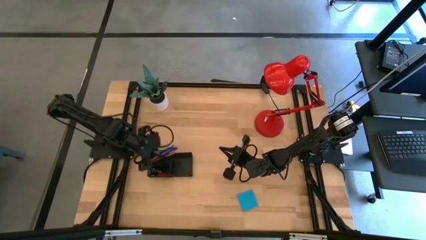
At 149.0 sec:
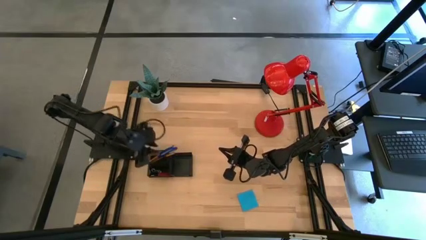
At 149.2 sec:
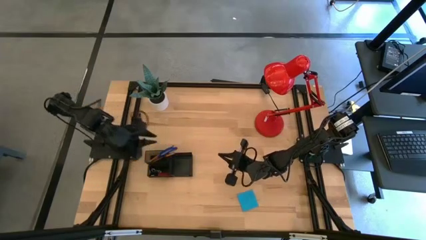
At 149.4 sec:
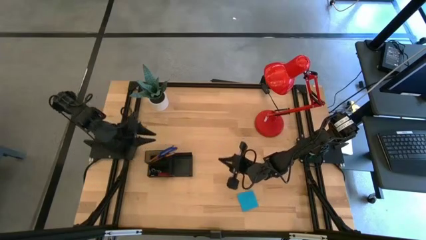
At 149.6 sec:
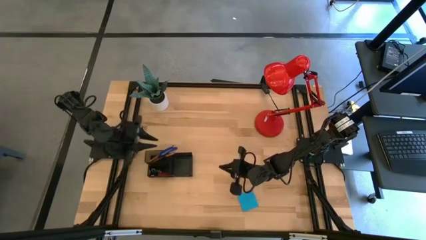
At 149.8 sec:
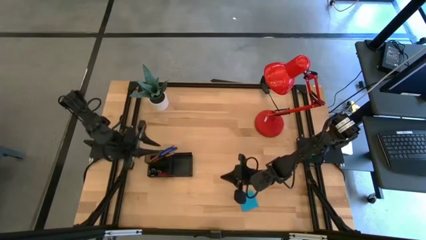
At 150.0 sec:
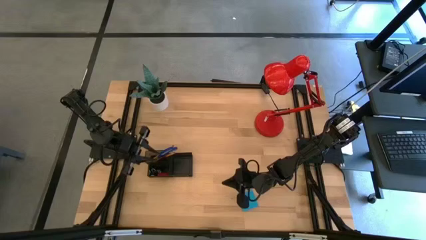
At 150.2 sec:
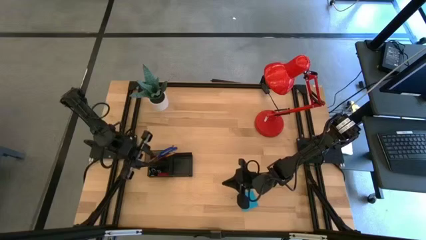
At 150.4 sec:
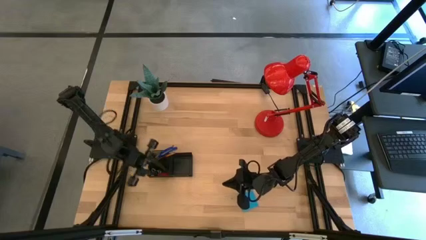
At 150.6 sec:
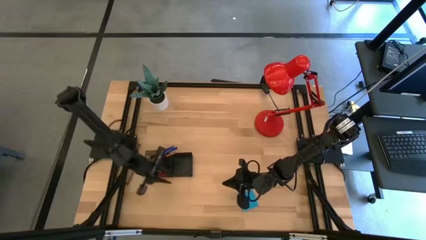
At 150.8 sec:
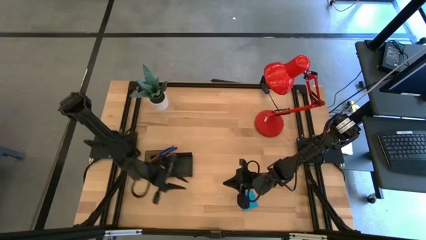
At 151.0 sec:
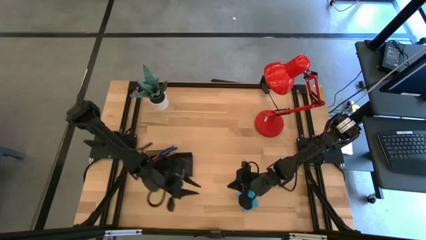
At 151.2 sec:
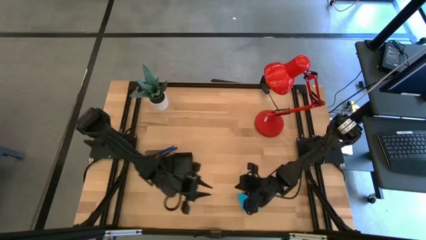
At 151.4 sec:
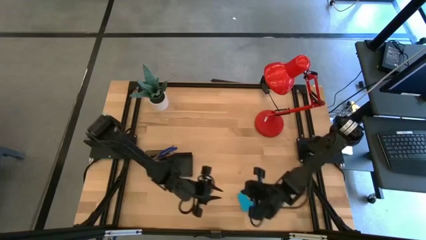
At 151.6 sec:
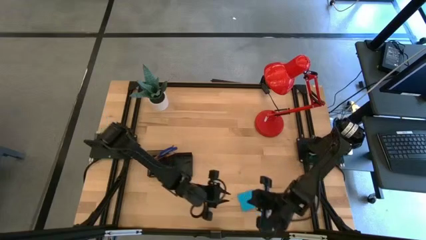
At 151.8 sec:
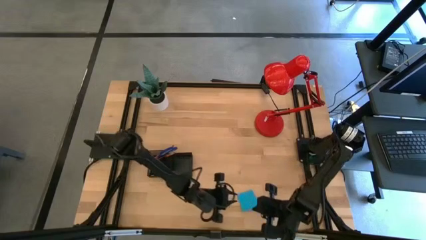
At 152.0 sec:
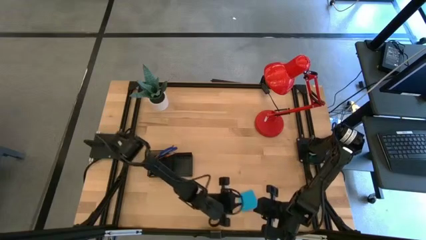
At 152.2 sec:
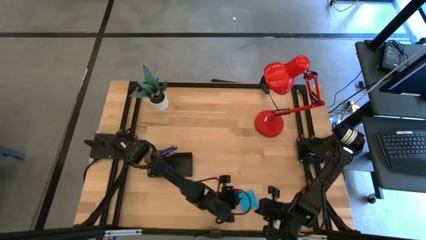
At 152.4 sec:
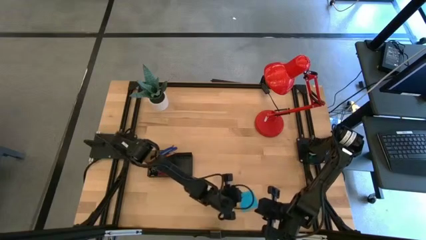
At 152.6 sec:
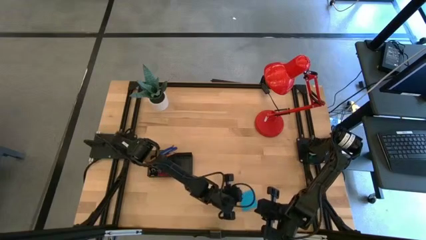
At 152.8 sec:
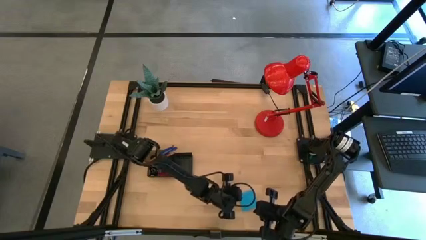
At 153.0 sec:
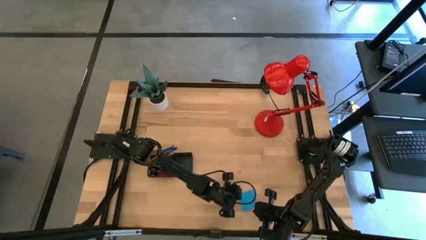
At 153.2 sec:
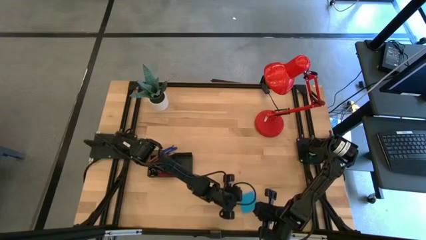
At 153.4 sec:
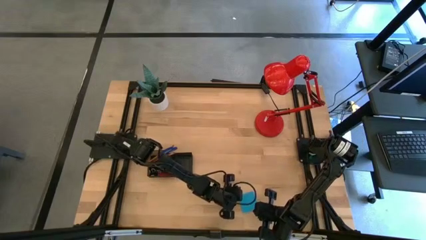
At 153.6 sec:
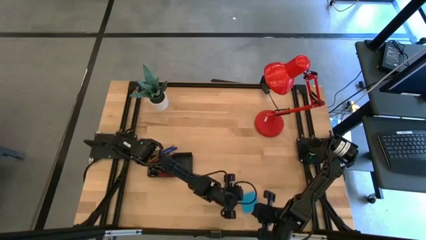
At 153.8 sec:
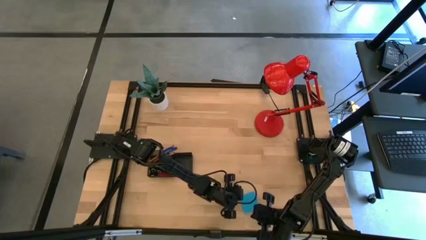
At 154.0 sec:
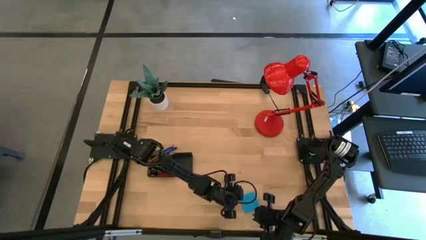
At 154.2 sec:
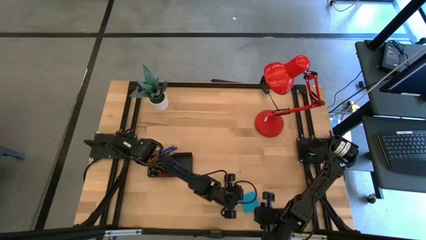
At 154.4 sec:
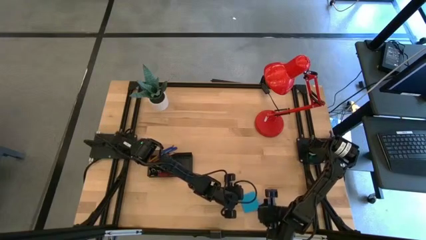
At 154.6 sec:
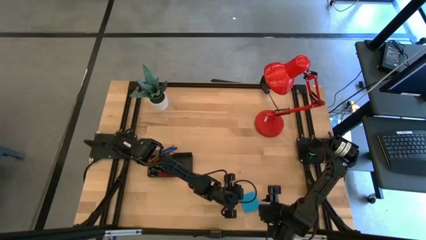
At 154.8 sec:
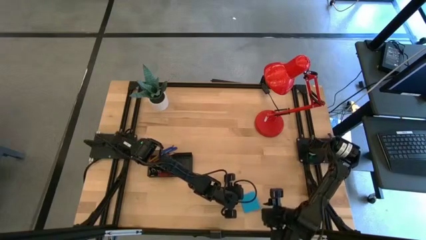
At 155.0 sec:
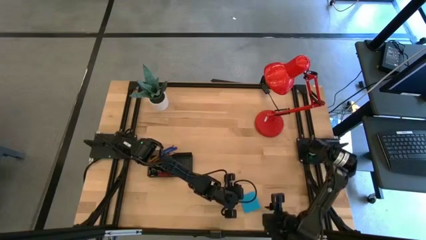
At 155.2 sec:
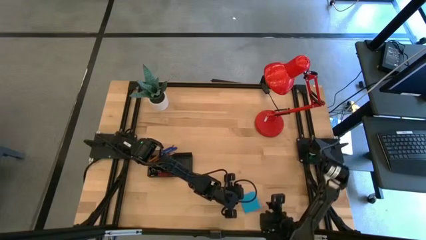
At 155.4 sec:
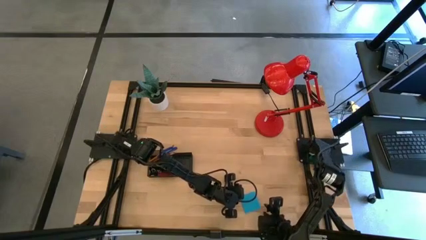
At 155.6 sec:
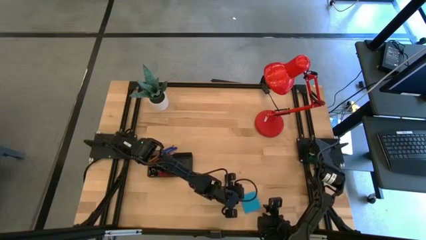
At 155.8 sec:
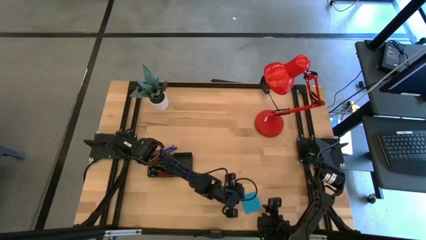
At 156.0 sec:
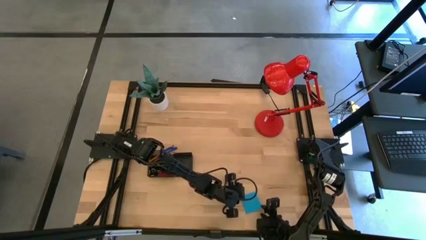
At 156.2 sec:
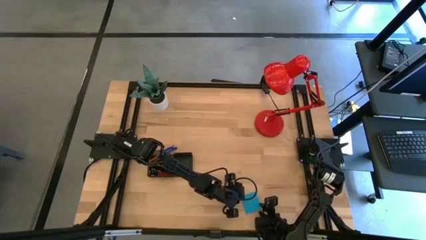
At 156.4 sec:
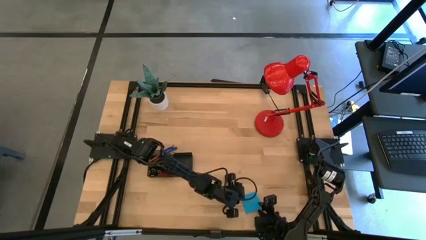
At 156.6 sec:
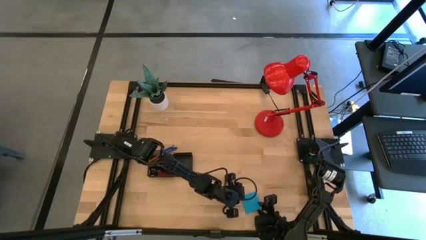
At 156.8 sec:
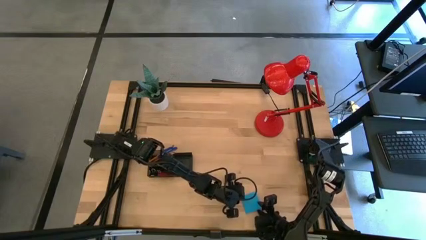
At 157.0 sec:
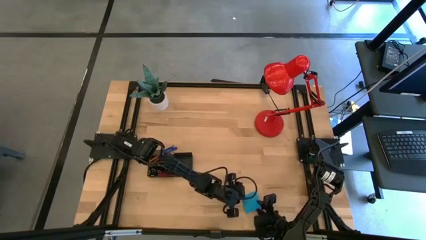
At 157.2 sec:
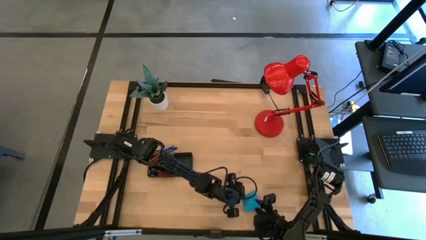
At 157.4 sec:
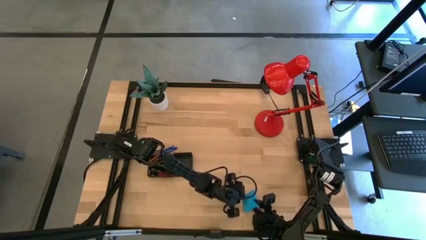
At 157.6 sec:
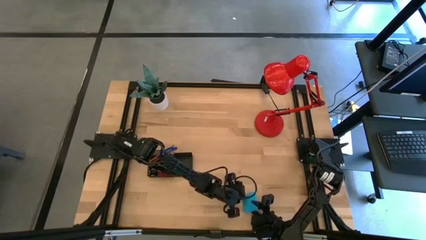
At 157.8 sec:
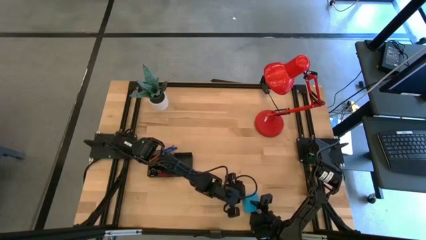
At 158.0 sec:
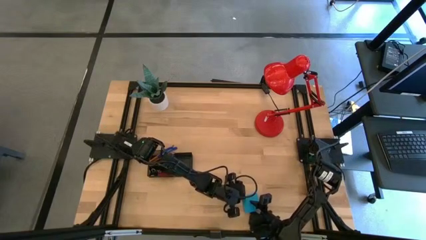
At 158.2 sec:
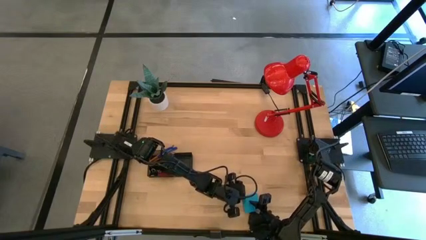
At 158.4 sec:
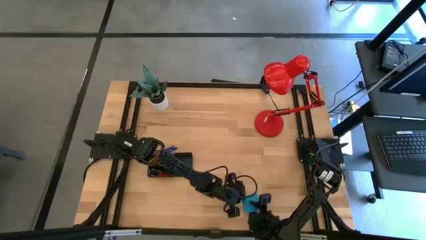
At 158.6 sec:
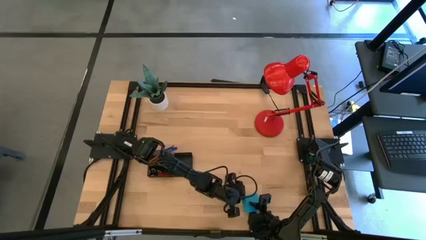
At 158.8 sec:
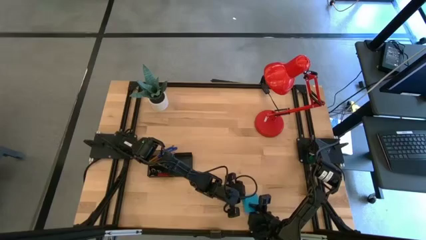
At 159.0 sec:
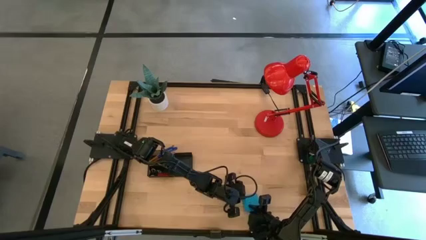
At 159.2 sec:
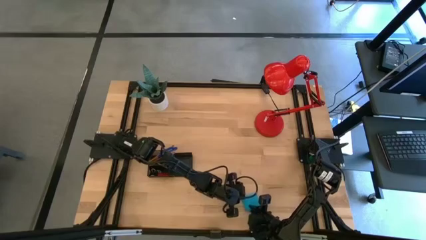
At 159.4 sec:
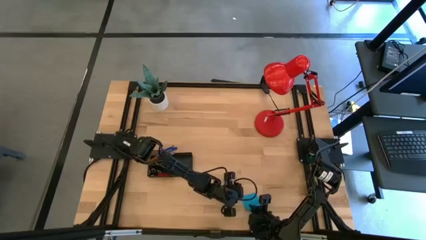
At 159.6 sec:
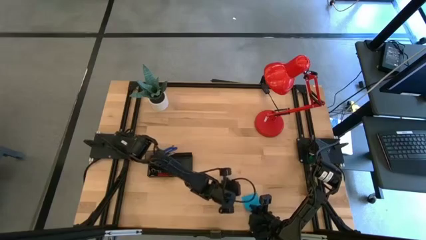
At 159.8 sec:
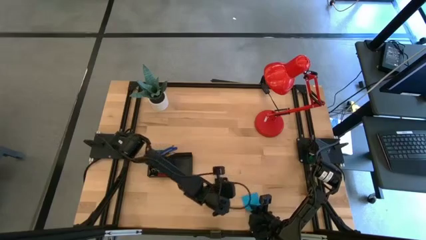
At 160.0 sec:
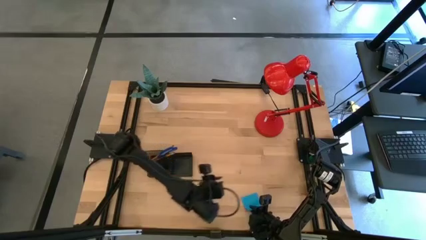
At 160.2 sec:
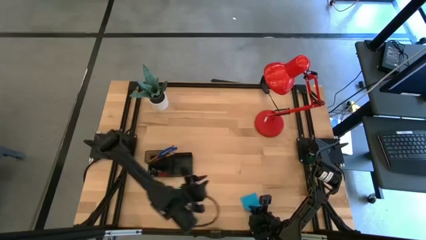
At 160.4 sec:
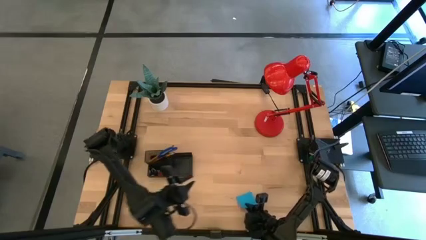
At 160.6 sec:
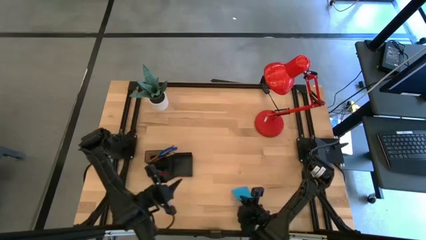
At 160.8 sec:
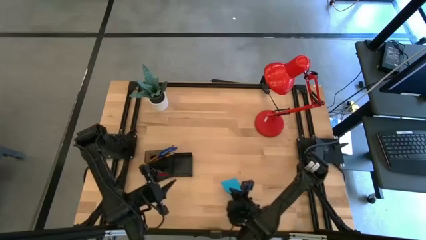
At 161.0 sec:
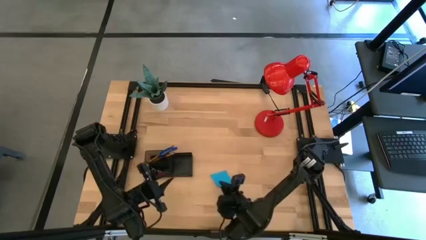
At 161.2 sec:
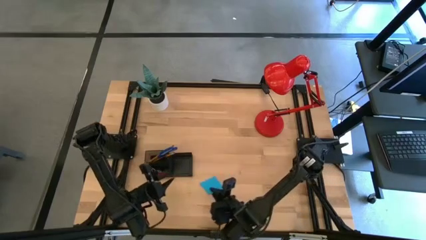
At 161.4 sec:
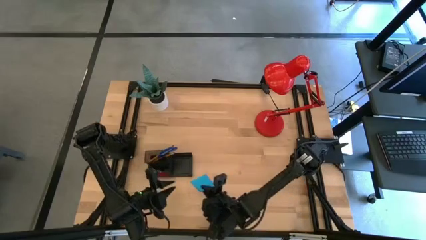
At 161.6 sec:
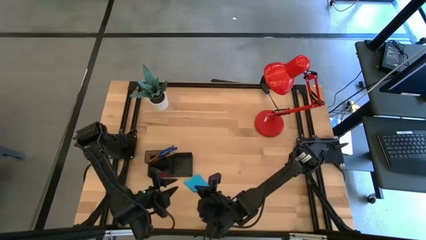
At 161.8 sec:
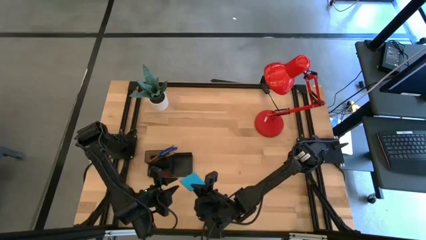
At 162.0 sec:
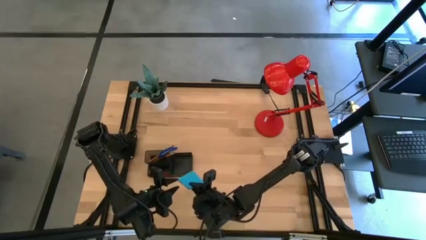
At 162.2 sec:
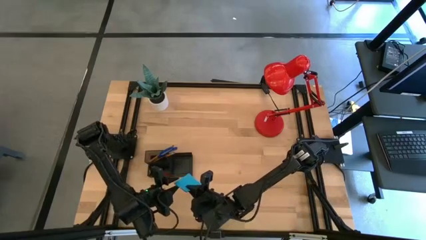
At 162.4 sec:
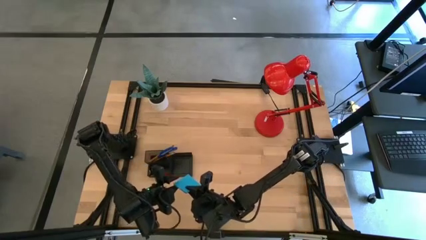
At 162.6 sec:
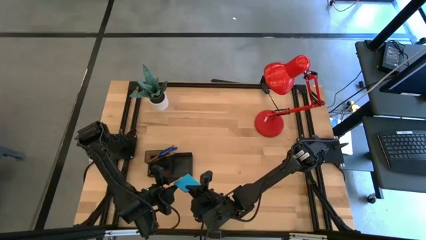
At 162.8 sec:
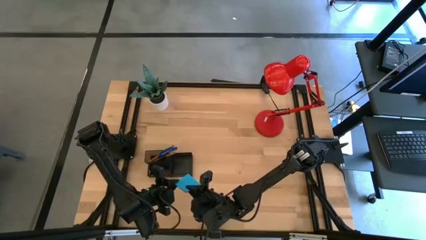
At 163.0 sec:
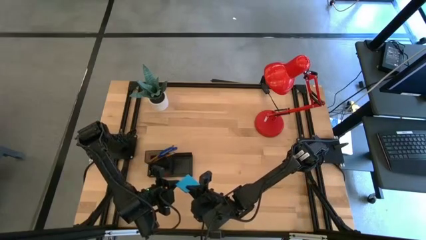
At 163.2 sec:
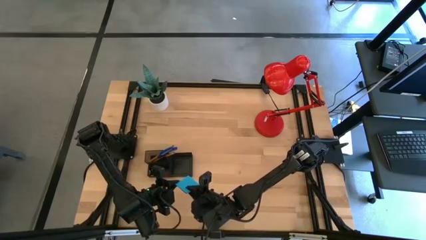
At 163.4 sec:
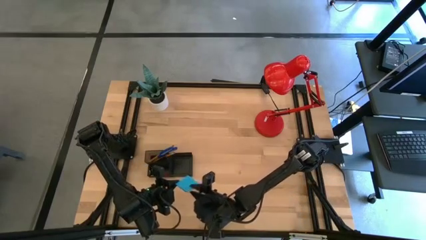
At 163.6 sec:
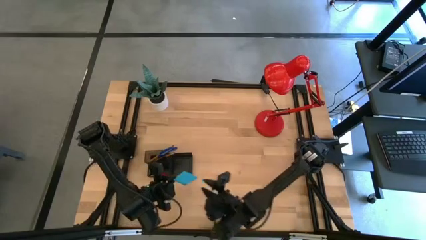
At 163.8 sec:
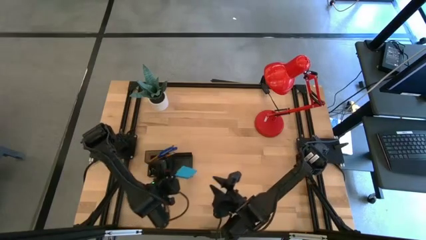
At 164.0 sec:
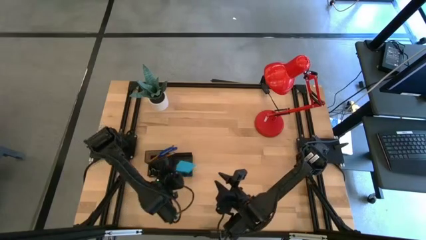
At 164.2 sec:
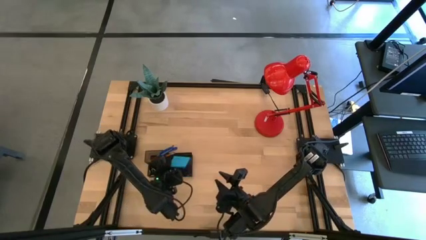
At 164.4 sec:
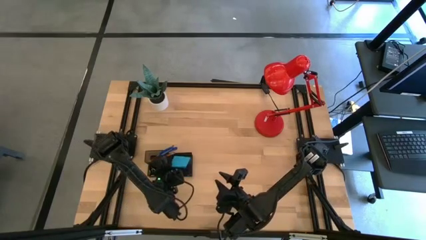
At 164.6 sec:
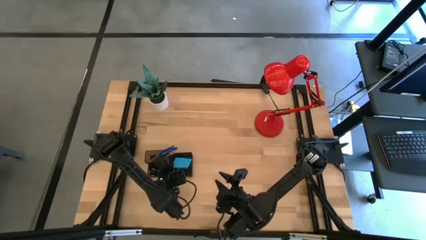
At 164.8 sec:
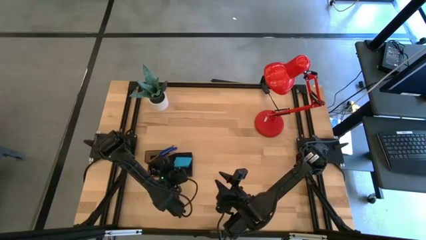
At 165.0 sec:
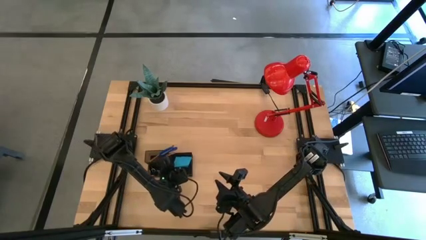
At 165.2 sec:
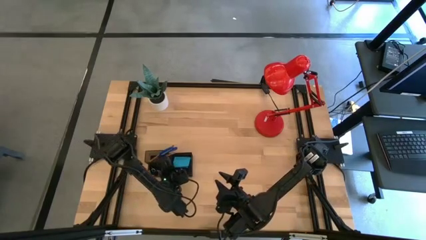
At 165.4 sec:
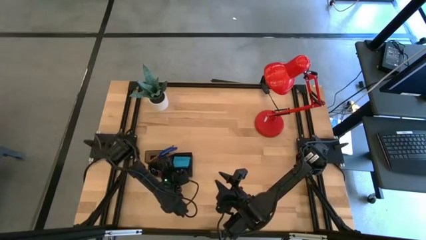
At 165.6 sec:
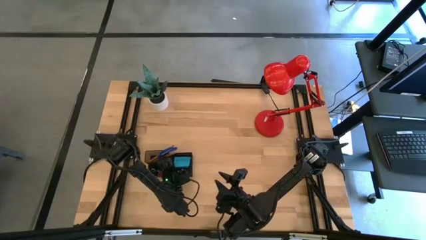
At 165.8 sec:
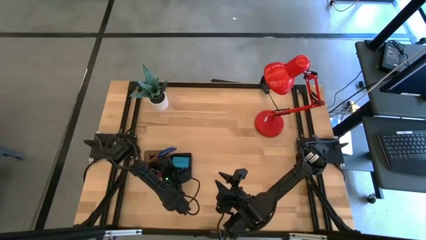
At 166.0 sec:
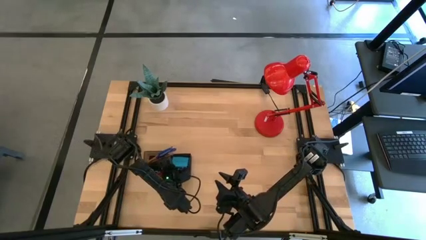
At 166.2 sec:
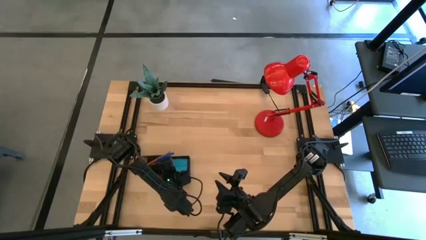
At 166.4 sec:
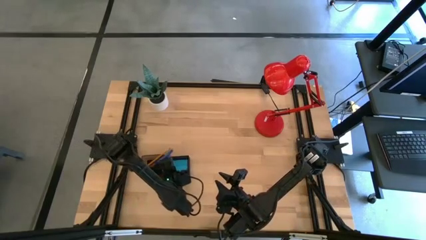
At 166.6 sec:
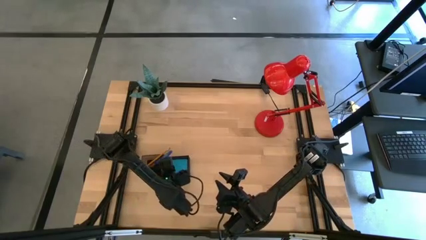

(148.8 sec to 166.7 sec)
Task: Pick and place office supplies into organizer
Put the blue sticky note into the right compartment of the desk organizer
